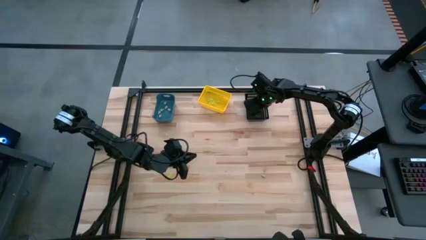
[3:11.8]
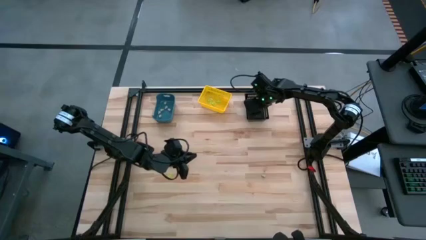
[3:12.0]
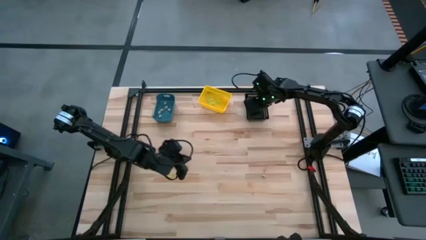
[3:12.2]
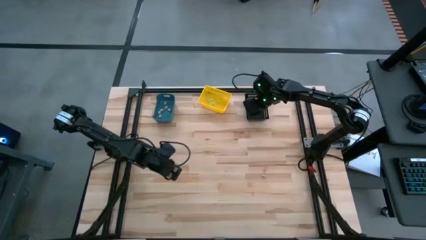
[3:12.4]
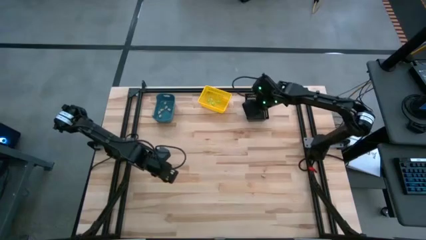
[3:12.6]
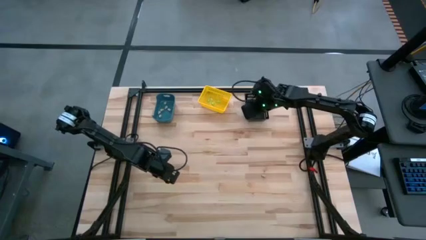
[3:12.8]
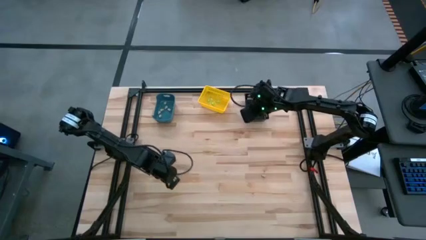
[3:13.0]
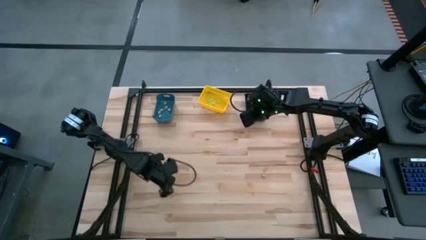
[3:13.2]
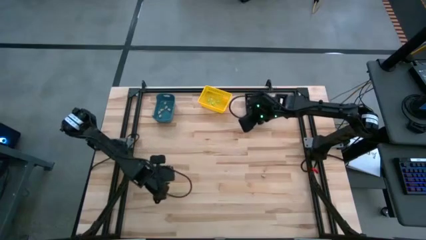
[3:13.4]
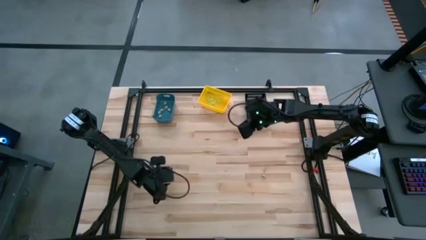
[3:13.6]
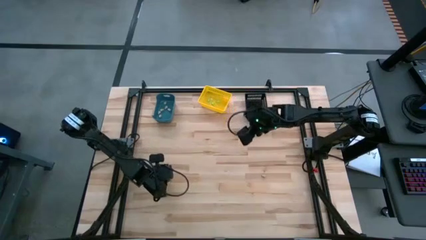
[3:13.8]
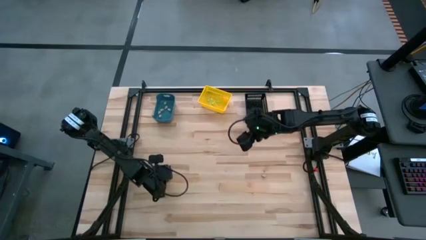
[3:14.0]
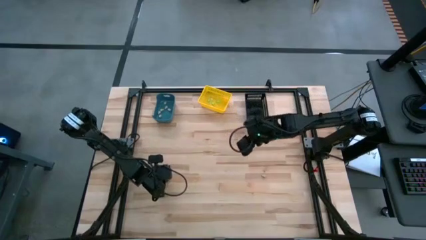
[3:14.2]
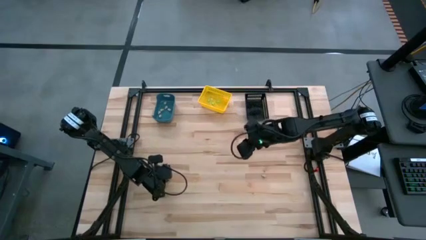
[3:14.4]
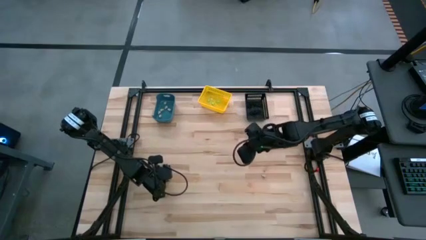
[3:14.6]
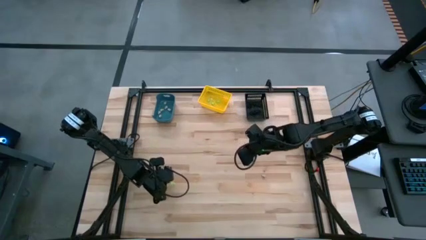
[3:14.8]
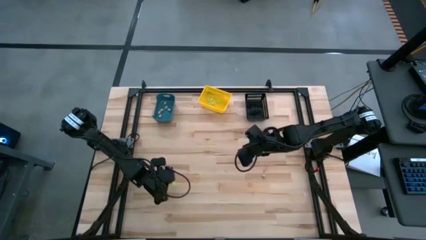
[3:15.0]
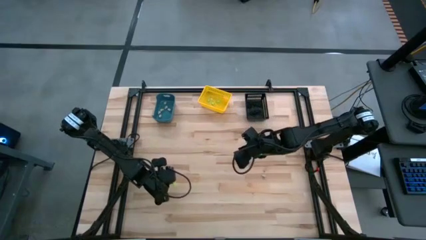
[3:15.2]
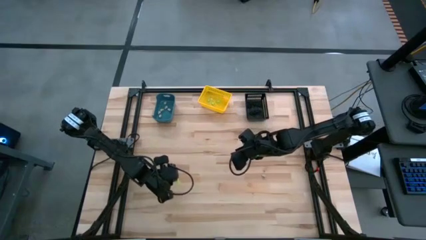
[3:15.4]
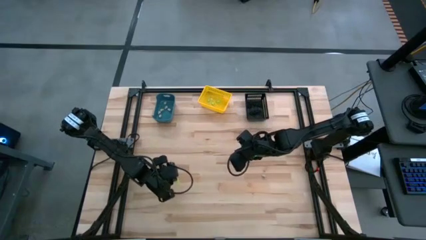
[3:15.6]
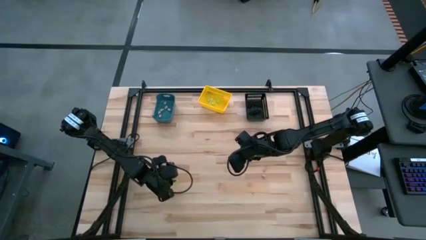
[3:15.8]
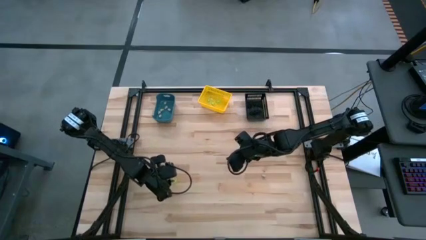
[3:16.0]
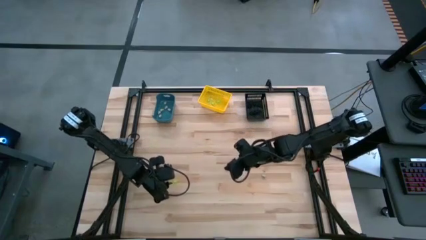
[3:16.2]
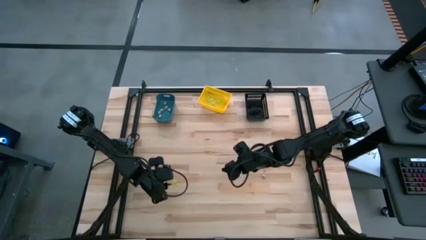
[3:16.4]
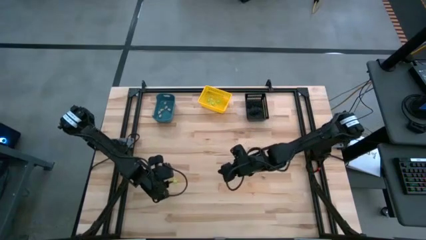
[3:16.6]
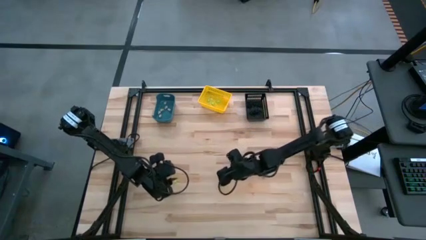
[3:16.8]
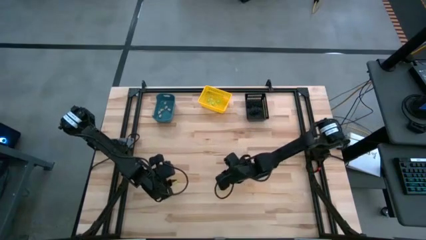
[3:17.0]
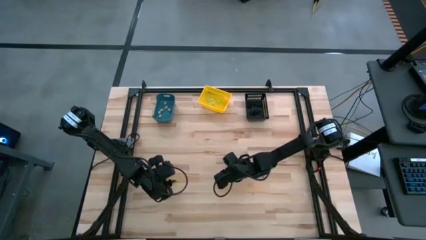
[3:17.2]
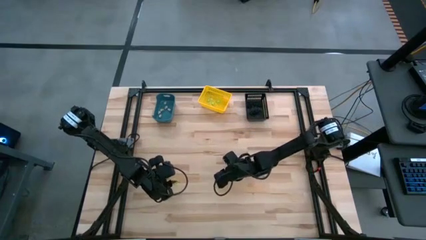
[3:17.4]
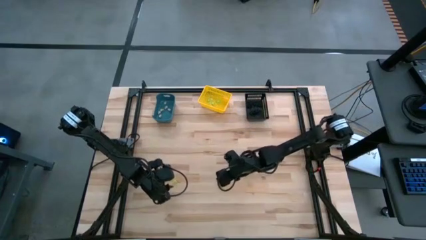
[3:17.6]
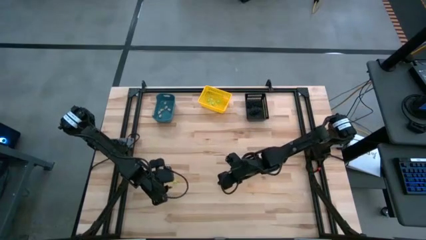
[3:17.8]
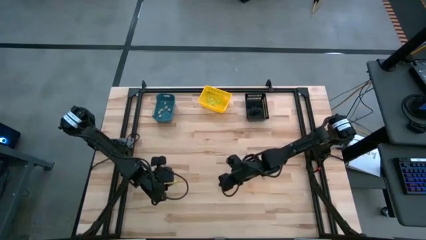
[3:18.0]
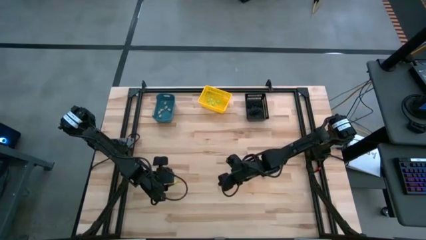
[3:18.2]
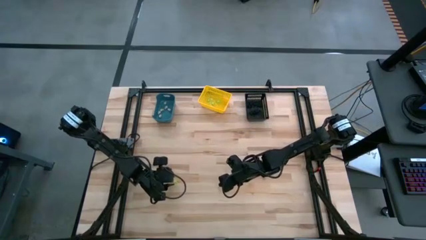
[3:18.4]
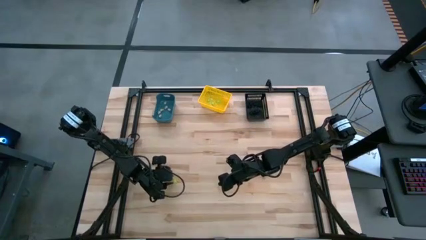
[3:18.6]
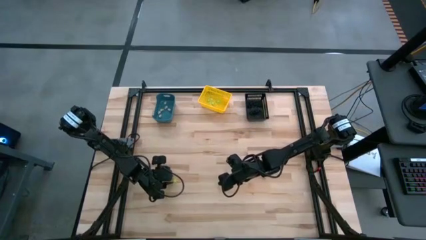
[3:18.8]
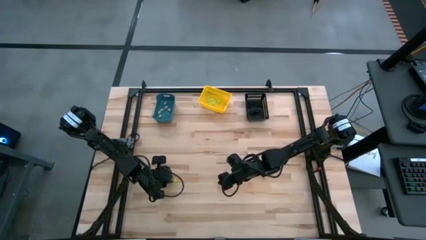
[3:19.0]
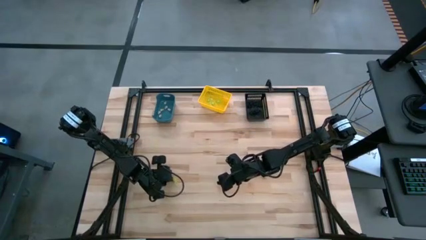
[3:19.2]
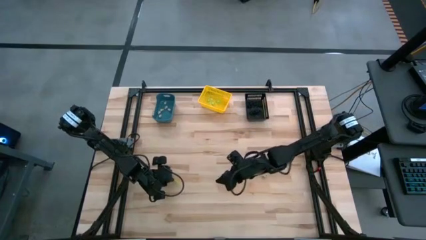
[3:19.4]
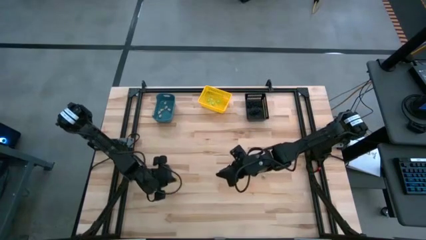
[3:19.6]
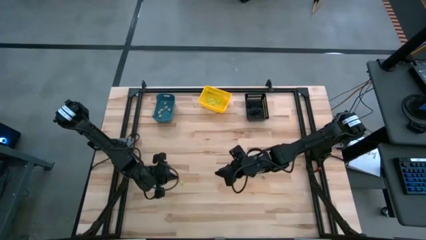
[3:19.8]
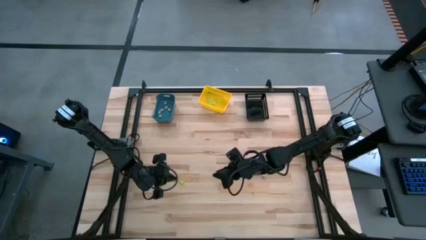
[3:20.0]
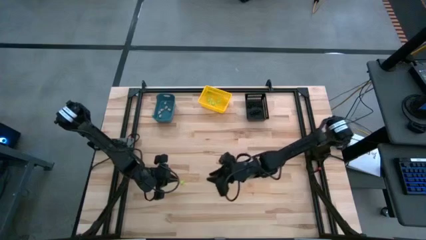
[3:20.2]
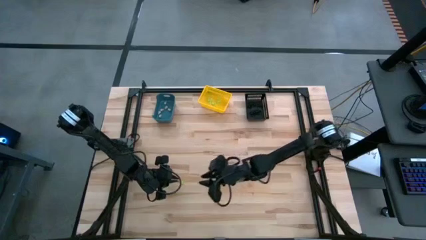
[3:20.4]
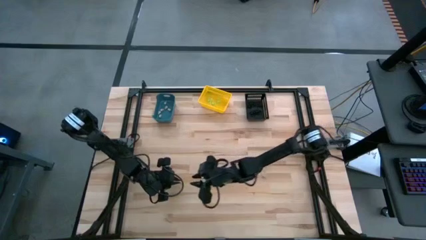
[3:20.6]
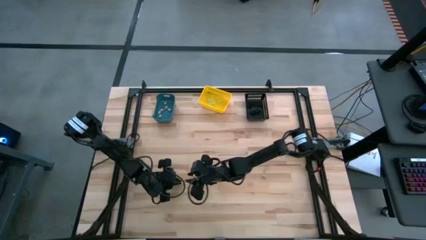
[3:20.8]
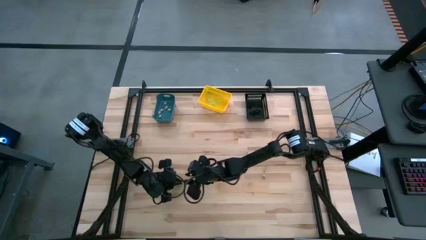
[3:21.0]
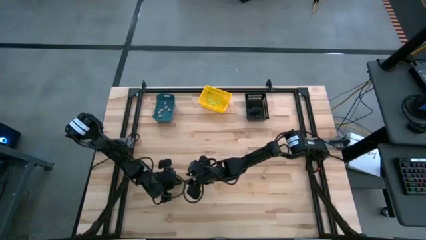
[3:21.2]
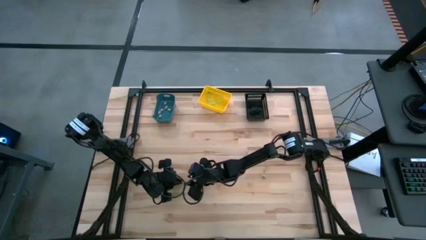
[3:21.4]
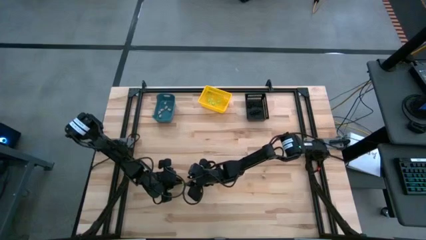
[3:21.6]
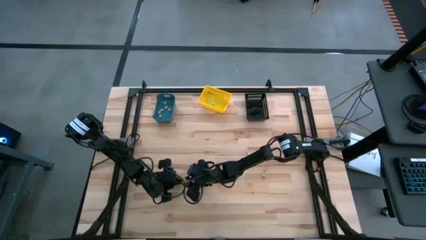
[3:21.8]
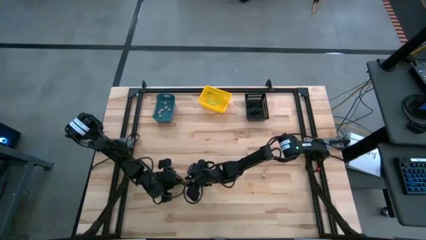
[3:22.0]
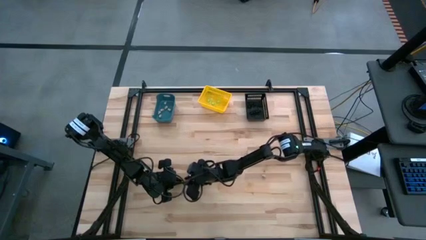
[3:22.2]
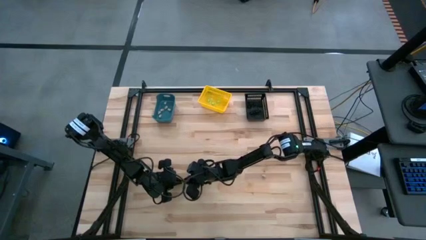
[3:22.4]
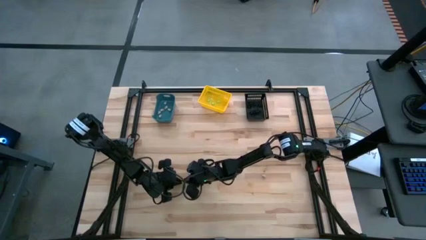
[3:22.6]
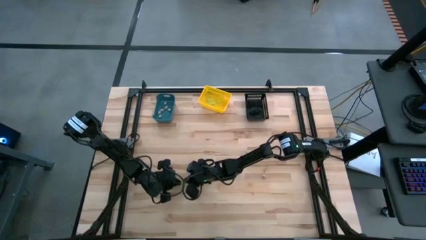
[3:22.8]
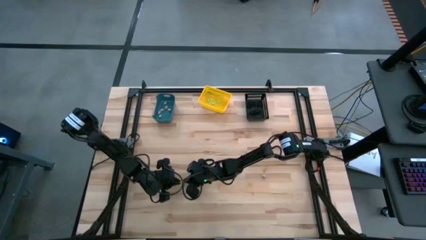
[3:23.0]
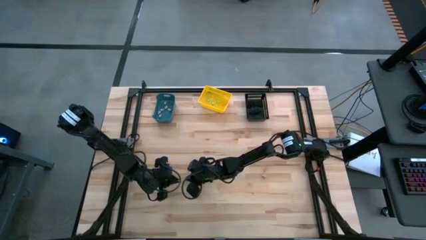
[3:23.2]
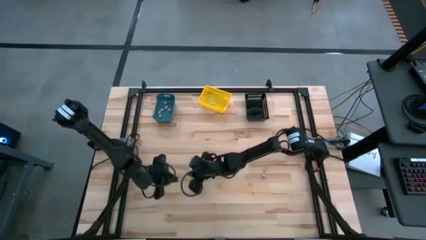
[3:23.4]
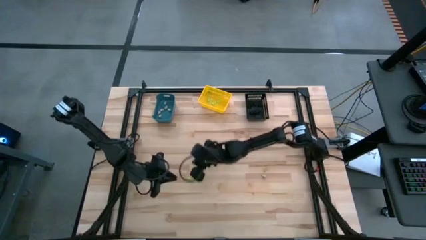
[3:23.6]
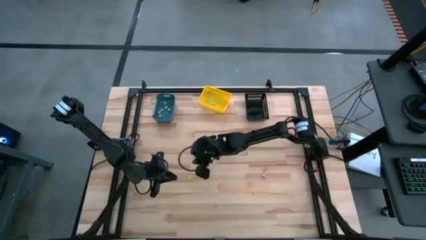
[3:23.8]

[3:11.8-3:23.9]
Task: Sort Halloween decoration
Put the green spider toy into the yellow bin

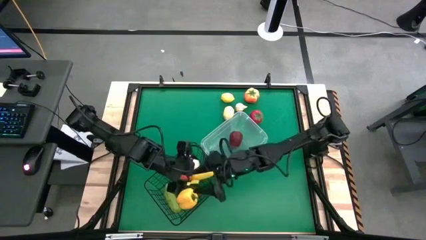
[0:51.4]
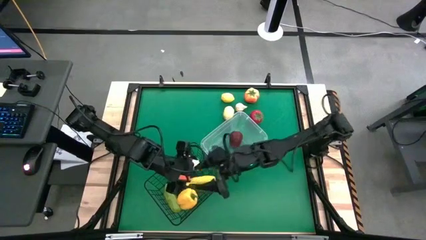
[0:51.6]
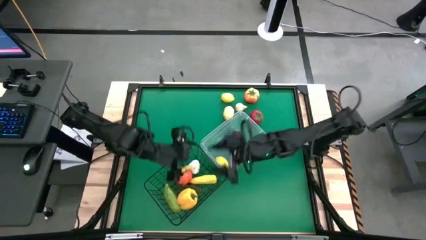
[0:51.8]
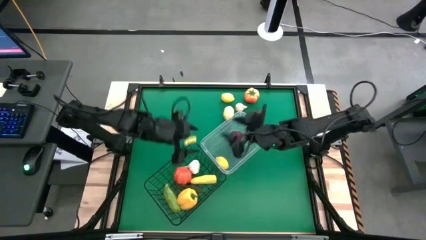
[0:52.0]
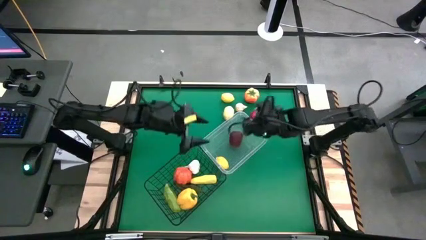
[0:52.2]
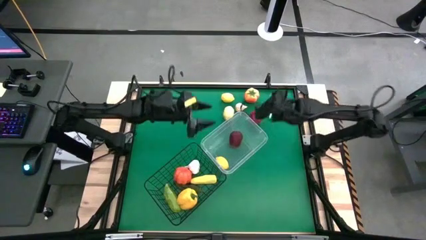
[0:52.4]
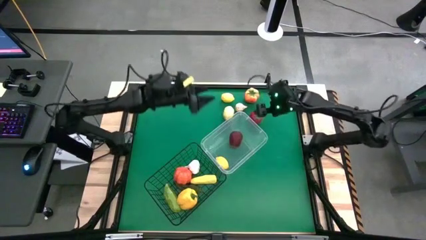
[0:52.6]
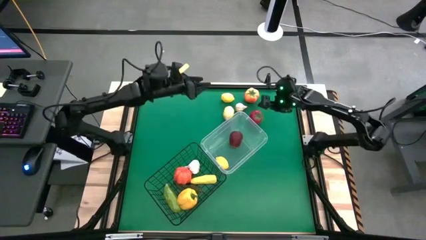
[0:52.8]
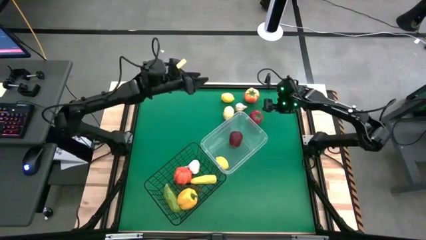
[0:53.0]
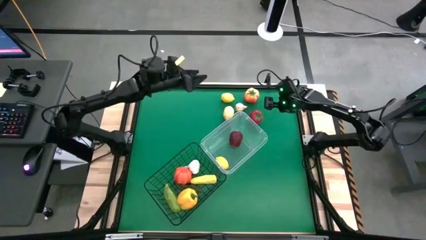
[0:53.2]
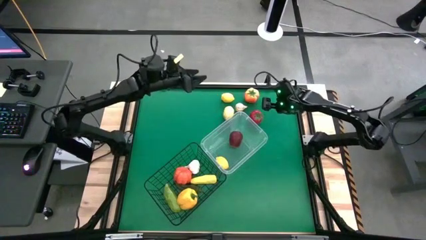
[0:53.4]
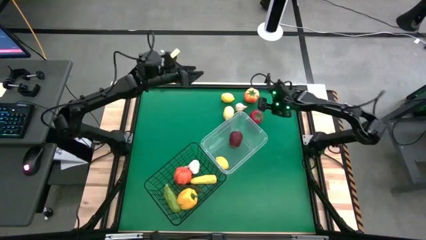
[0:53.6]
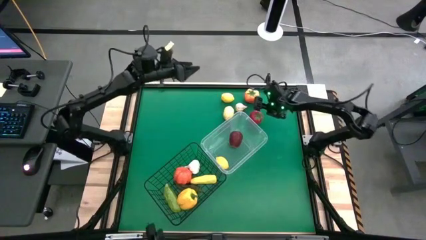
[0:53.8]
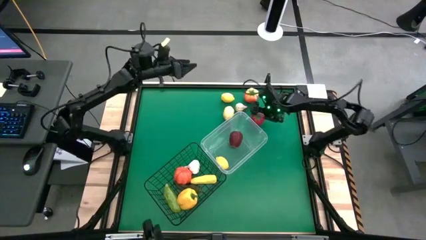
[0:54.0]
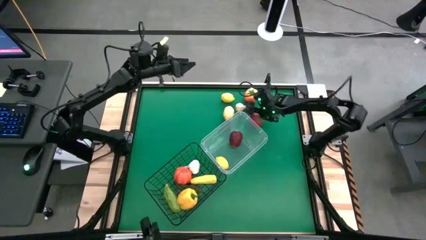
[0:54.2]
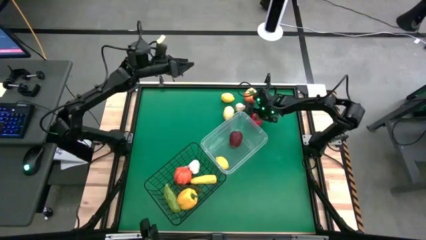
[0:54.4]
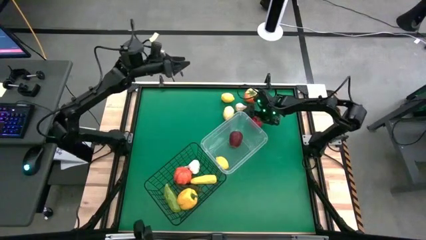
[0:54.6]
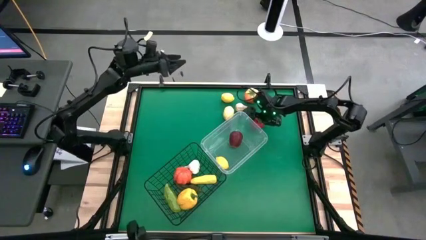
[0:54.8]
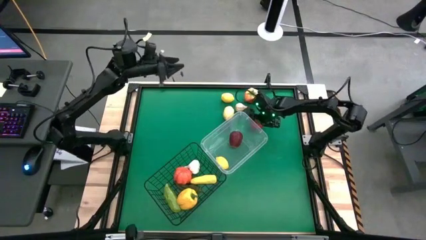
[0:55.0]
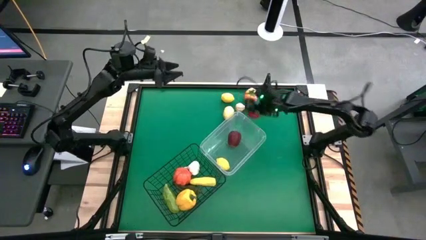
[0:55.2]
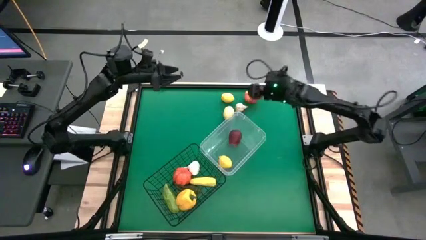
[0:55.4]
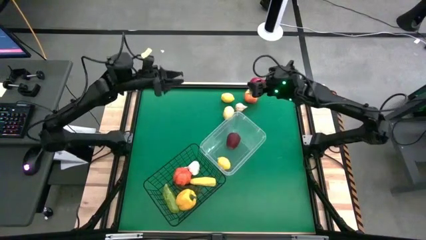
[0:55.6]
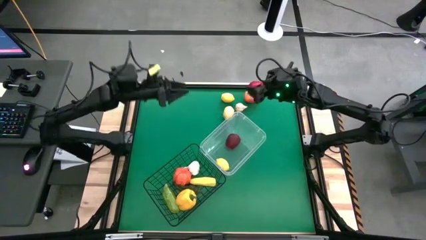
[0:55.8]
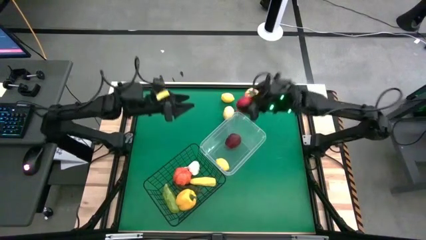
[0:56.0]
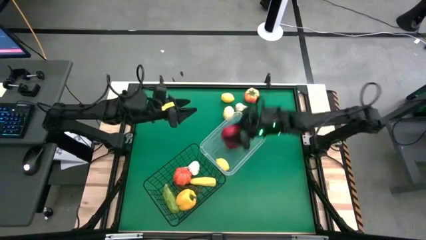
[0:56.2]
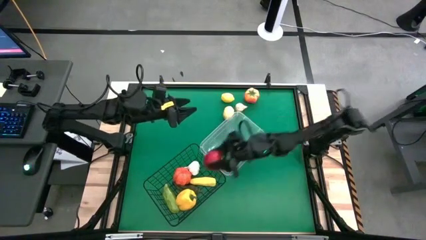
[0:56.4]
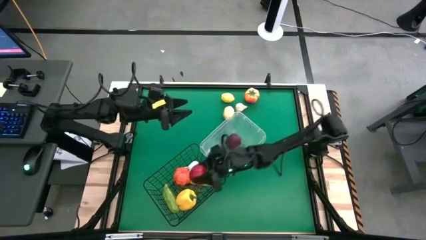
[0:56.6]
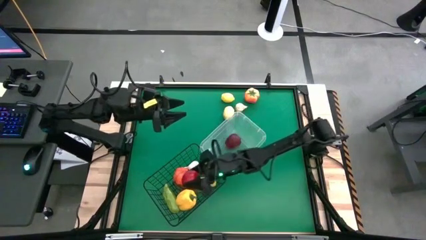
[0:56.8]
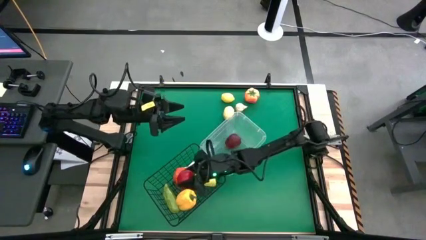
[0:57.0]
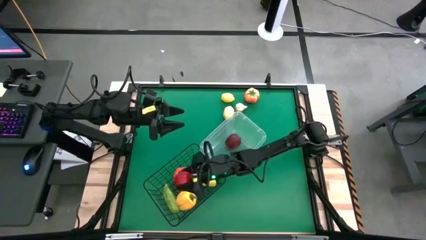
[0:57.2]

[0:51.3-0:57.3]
Task: Sort produce into baskets
Put the bottom tomato into the wire basket
